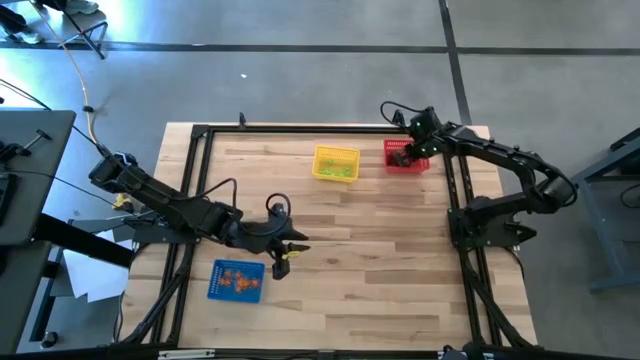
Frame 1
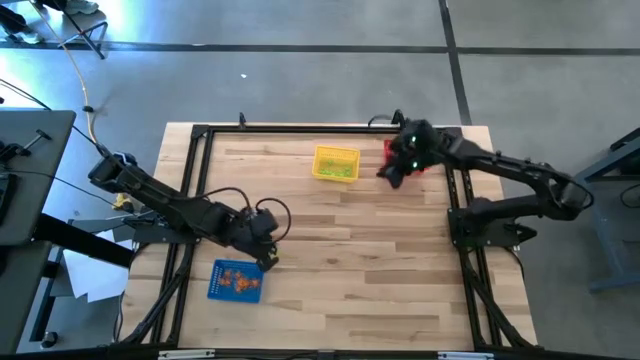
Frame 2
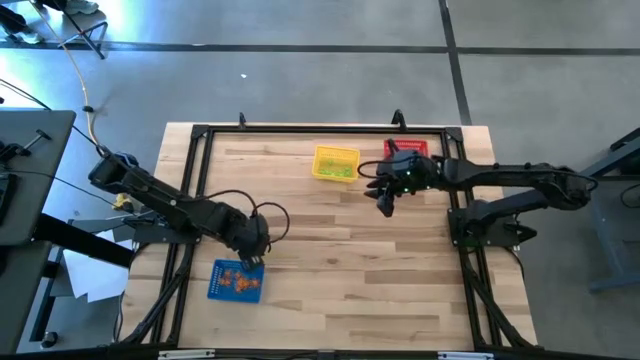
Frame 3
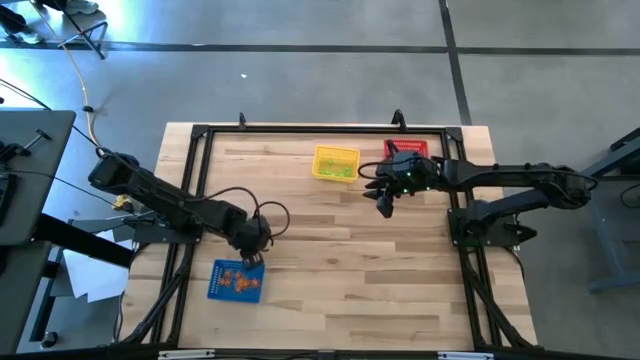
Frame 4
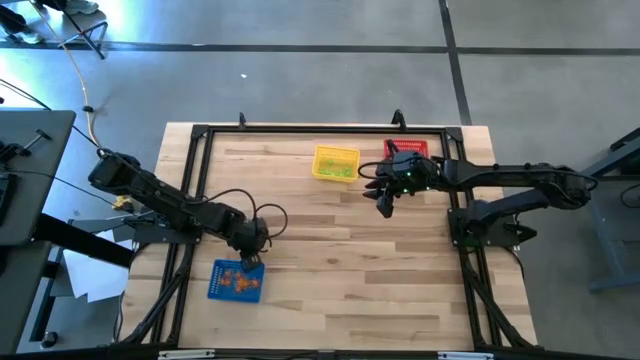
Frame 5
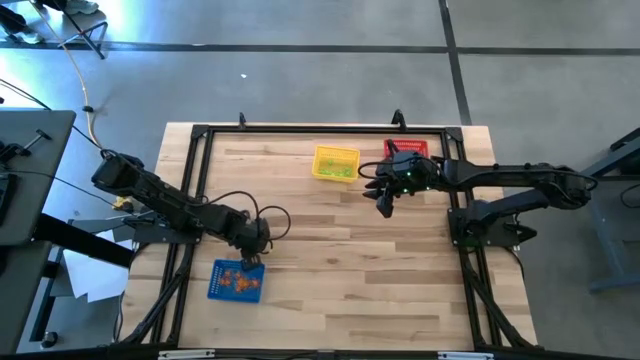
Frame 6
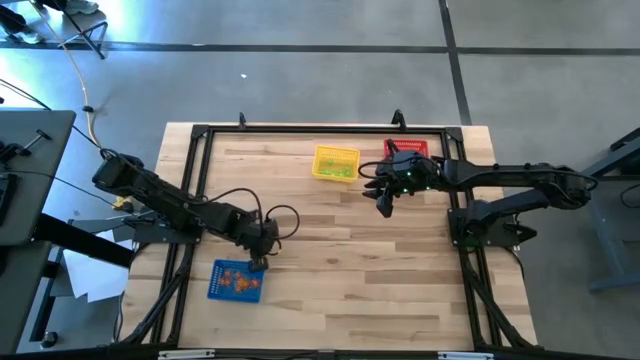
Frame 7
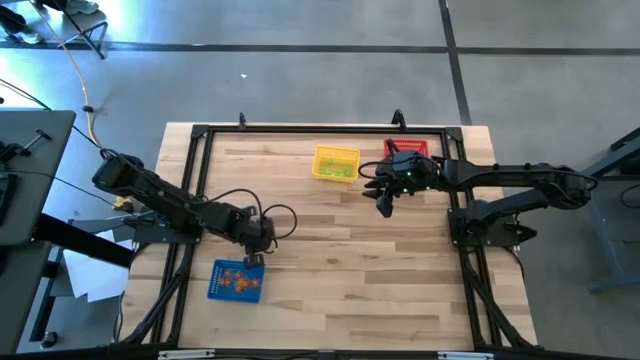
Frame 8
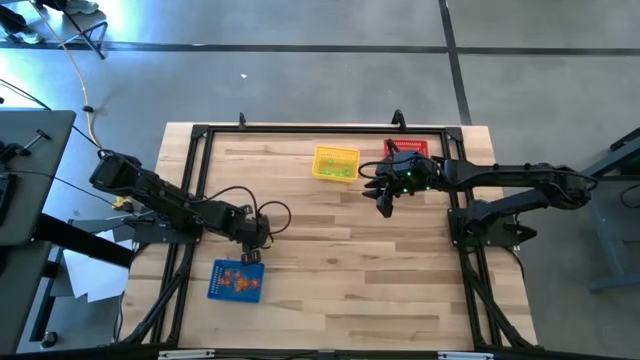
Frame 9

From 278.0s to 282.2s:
Task: Sort Halloween decoration
Put the orange spider toy into the blue bin

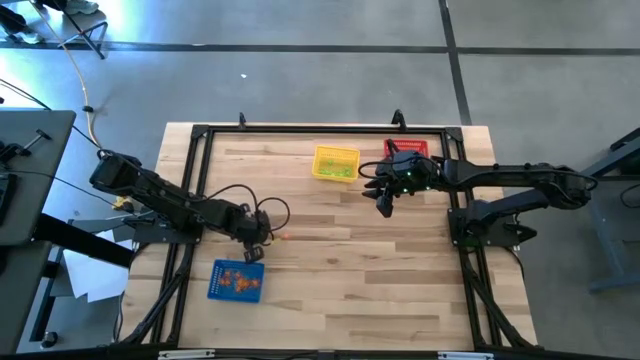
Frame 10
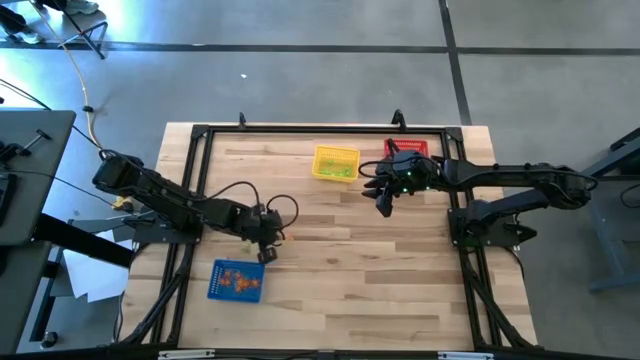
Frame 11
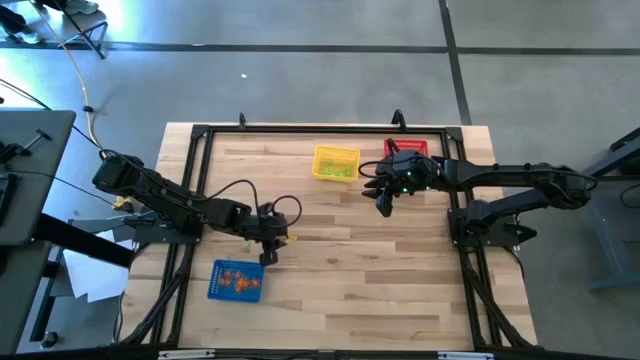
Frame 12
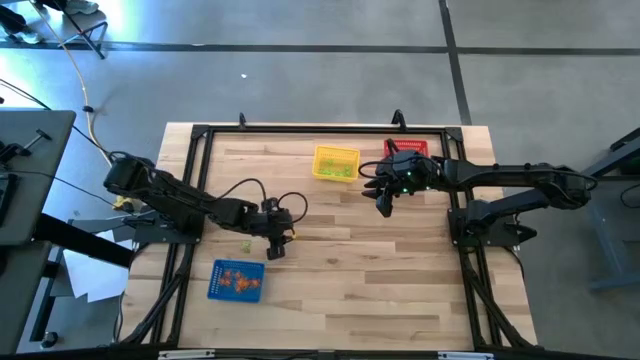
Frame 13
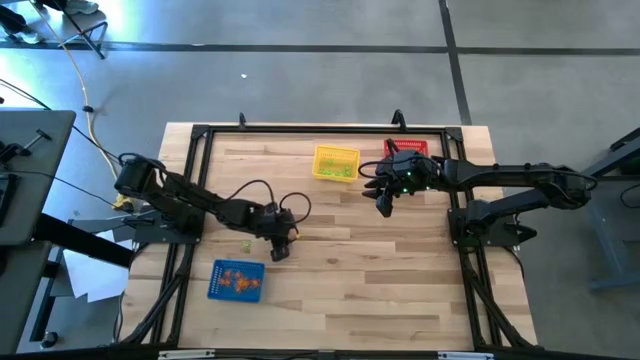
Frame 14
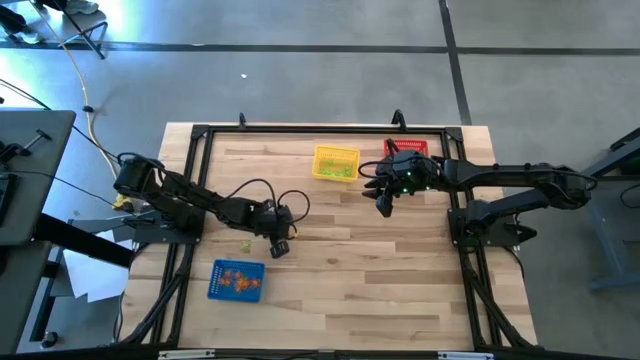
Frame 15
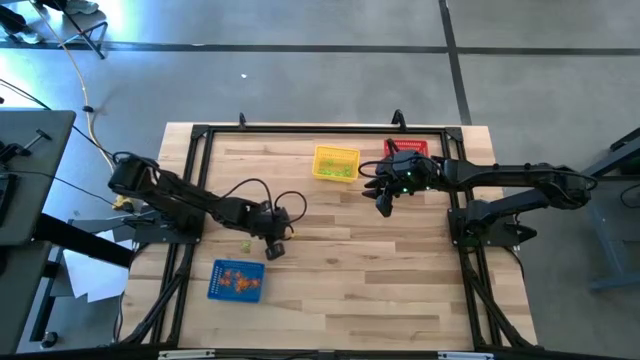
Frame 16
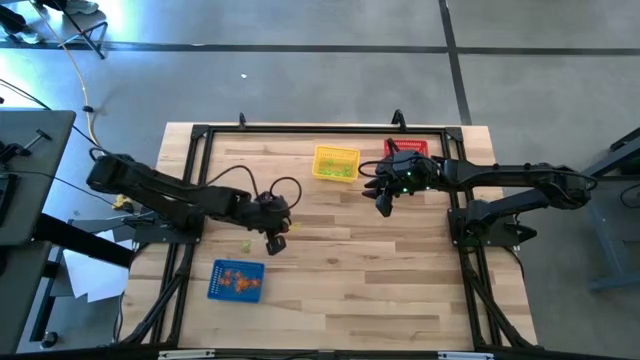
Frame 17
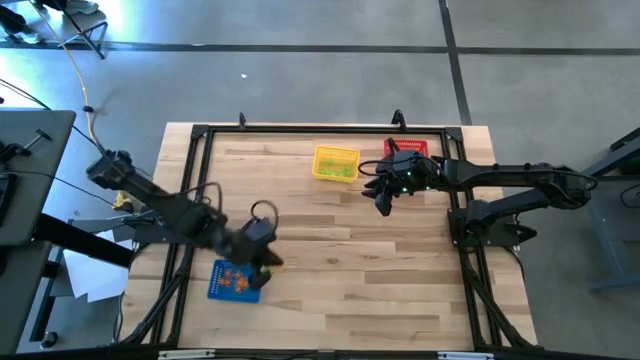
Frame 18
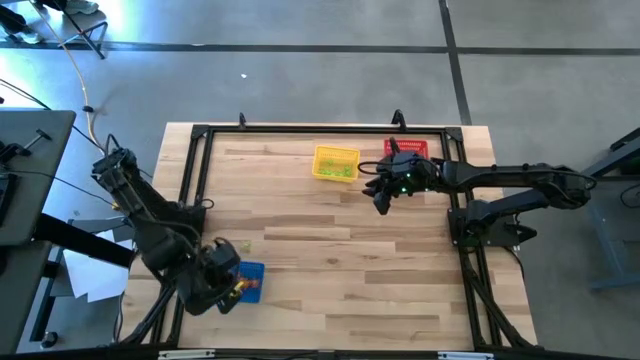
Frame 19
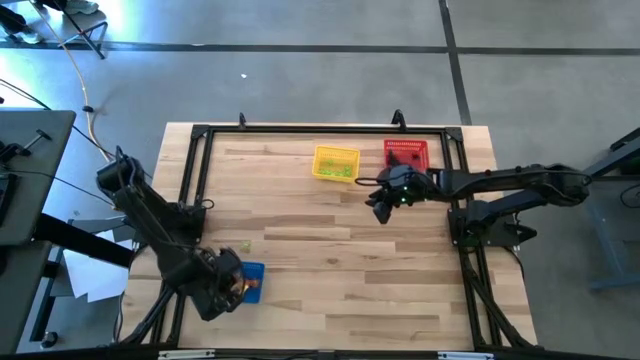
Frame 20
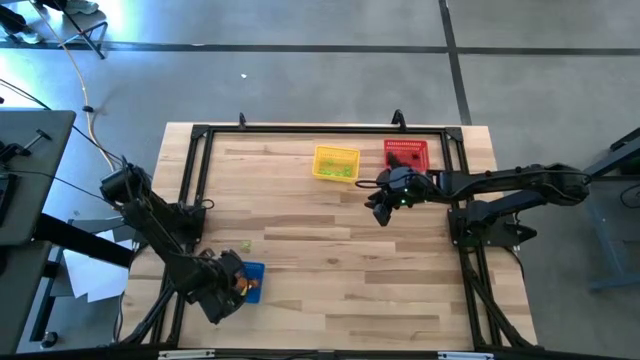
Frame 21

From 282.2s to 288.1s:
Put the orange spider toy into the blue bin

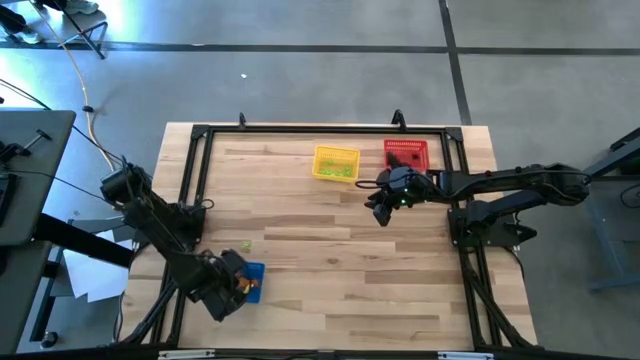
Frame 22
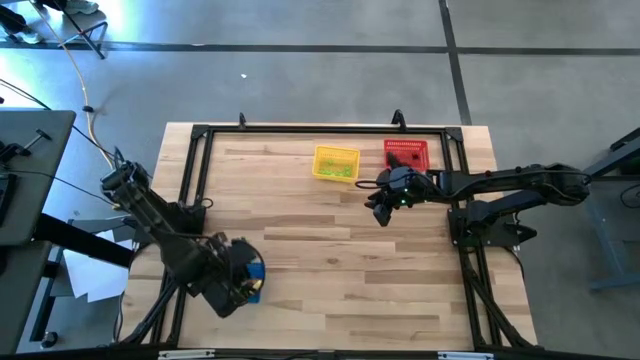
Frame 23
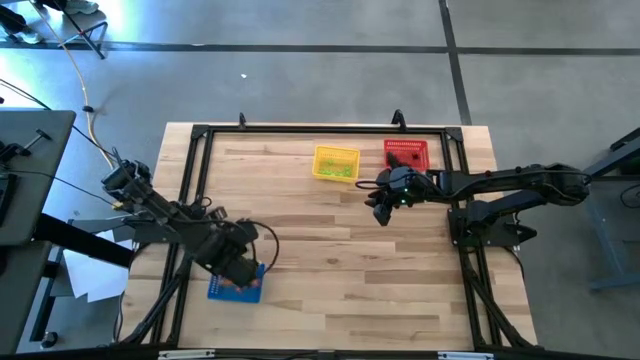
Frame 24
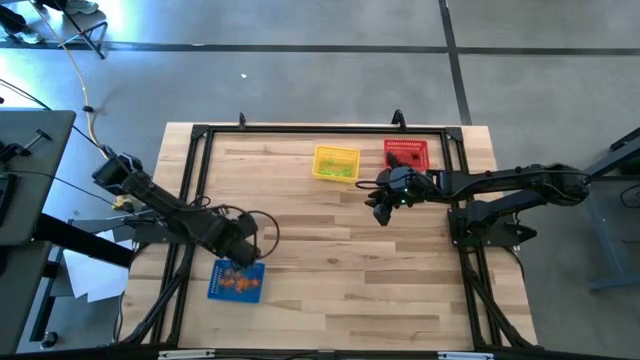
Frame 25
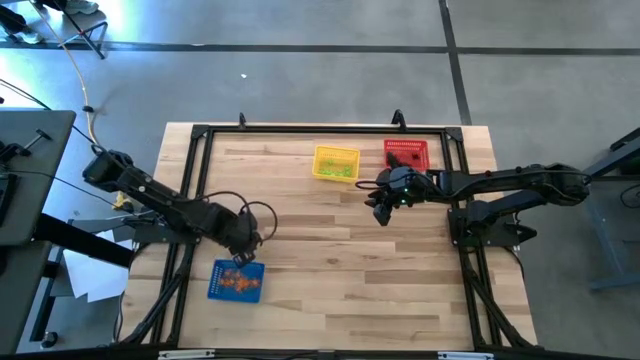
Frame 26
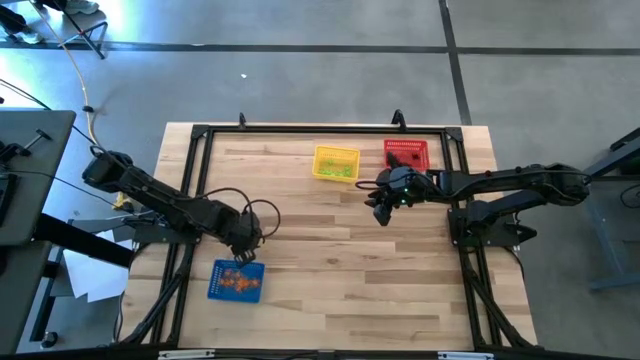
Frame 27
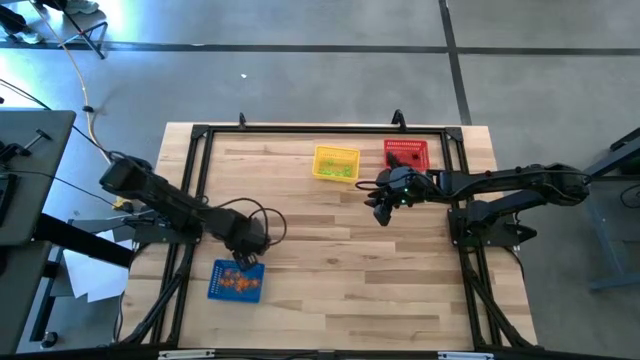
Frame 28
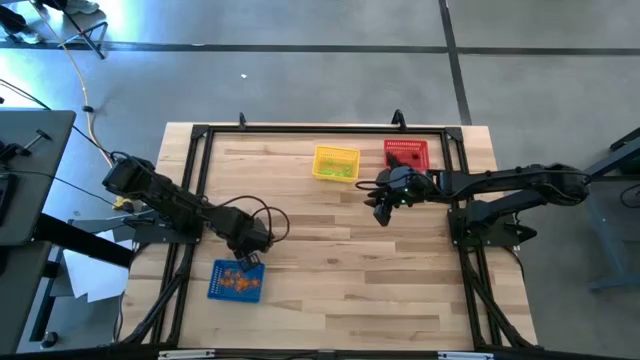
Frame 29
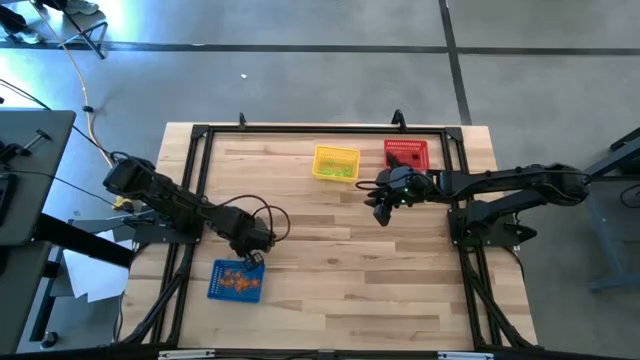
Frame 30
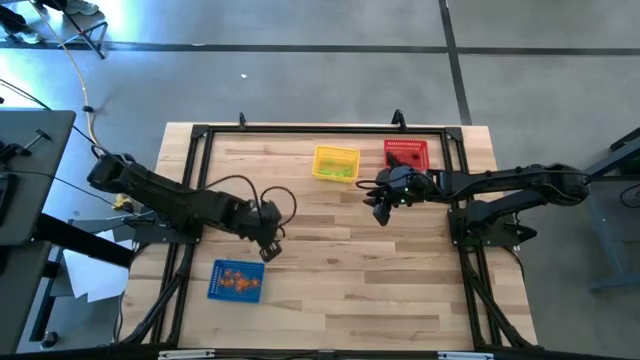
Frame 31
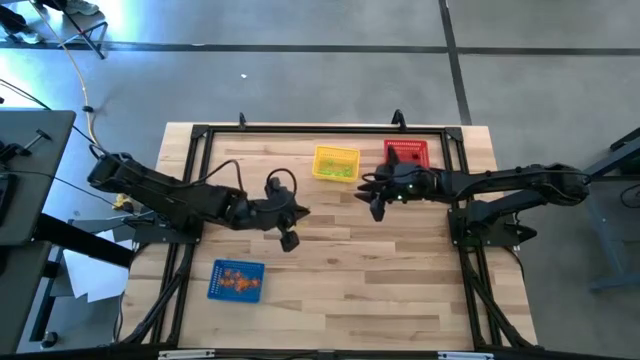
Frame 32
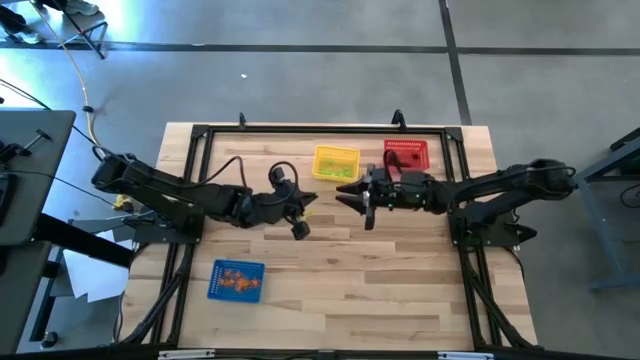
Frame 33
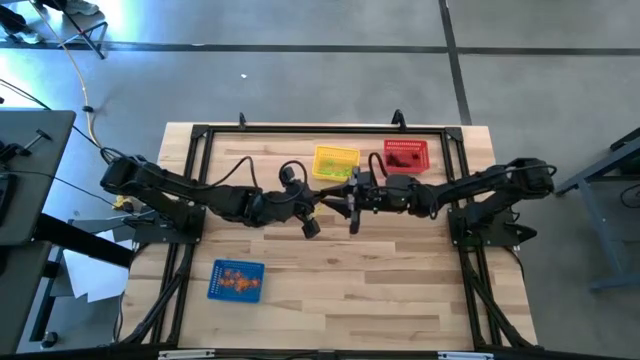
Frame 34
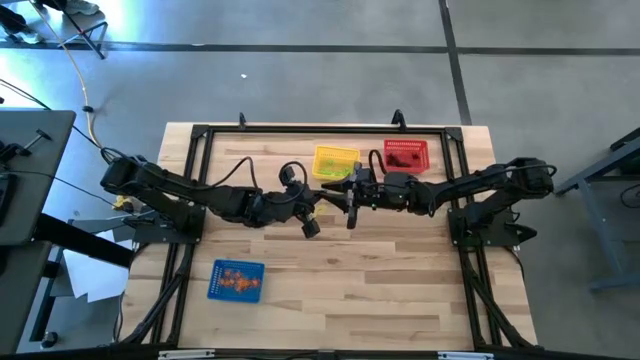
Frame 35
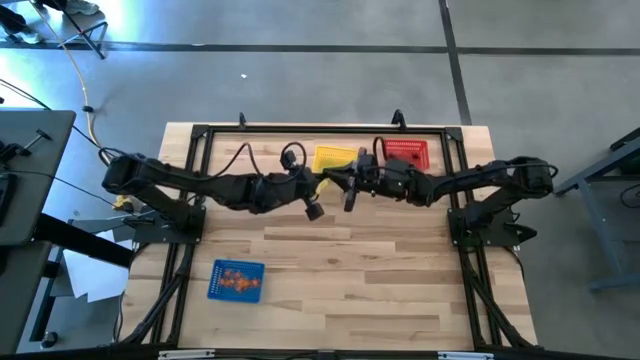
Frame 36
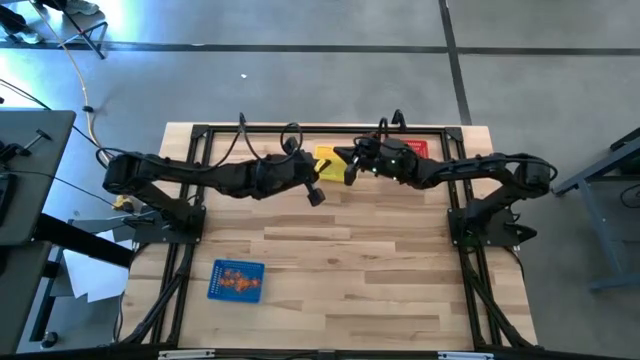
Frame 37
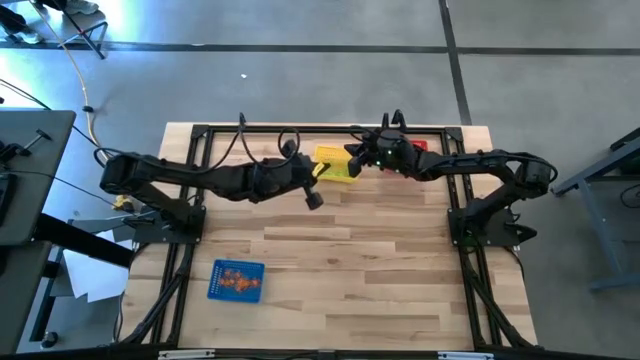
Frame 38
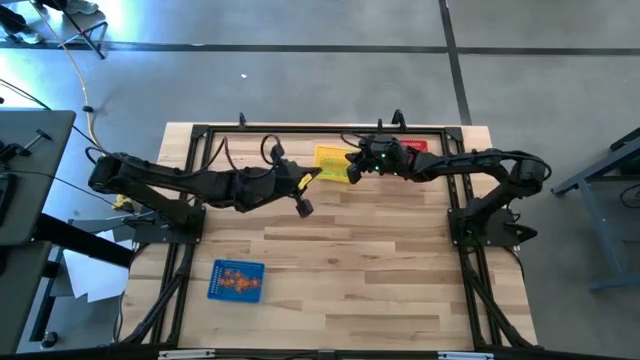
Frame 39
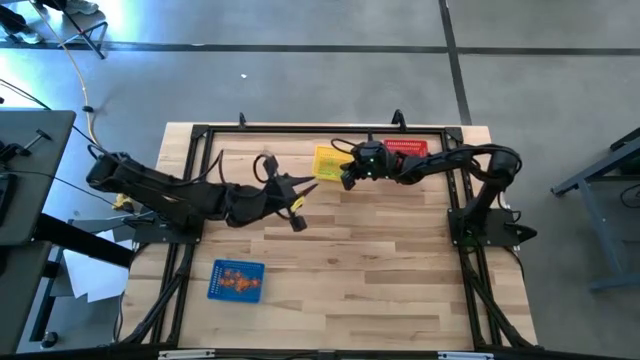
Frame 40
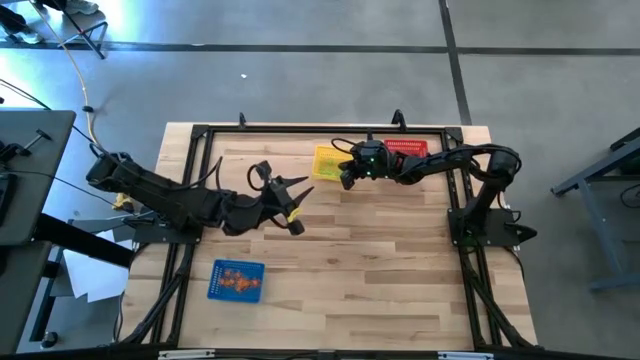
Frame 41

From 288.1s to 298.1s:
Put the green spider toy into the yellow bin

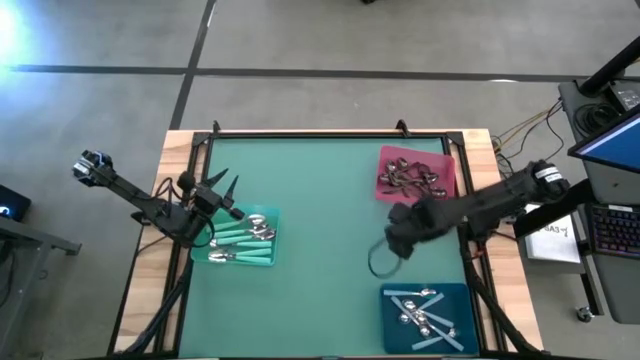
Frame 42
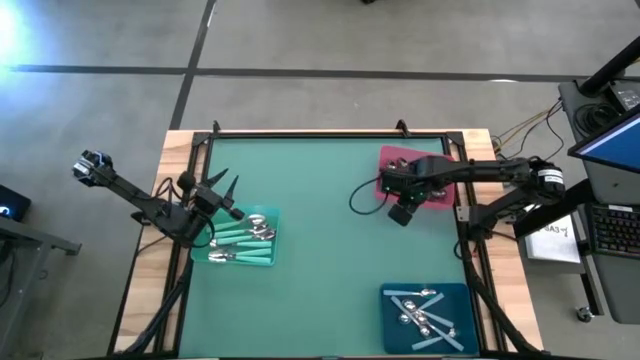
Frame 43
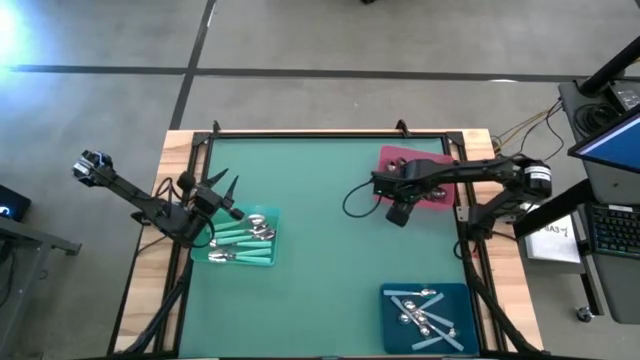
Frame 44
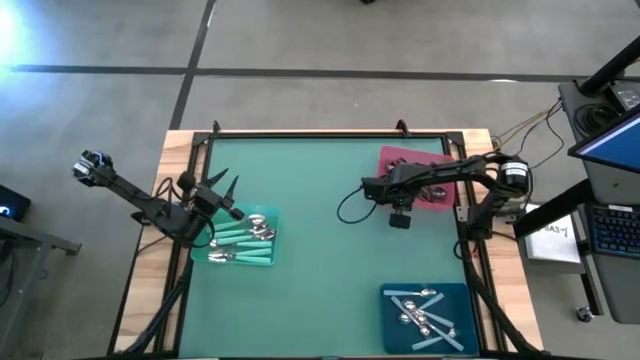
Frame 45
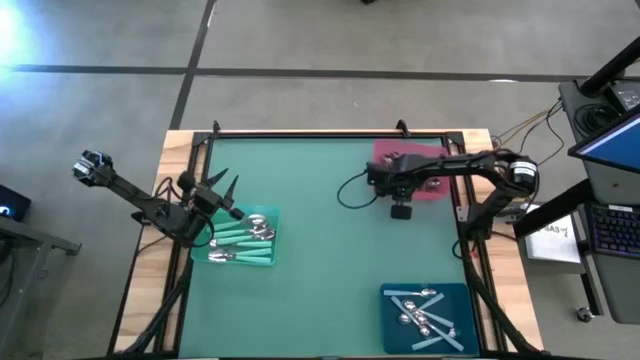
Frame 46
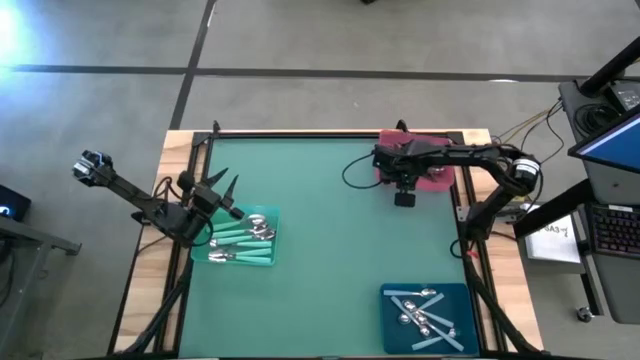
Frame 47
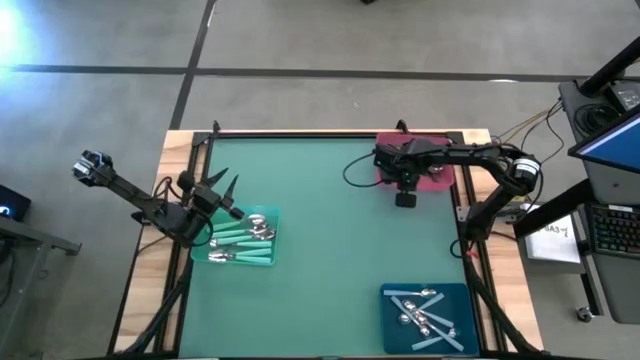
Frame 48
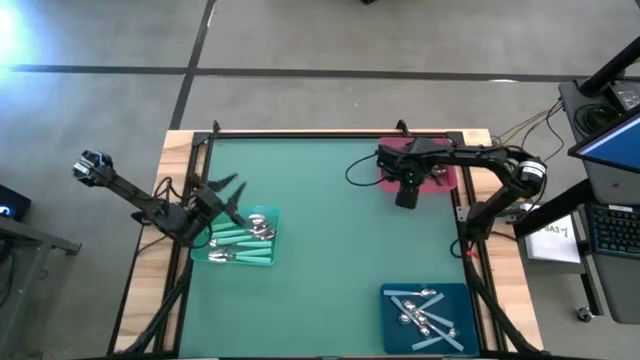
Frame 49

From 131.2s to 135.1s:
Task: Sort silverware by color (type)
Adjust the red bin
